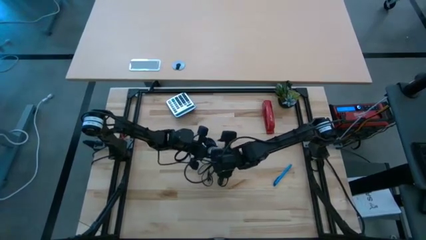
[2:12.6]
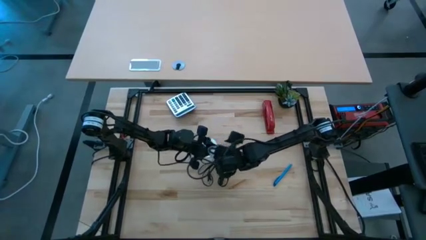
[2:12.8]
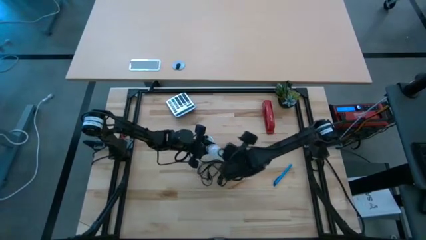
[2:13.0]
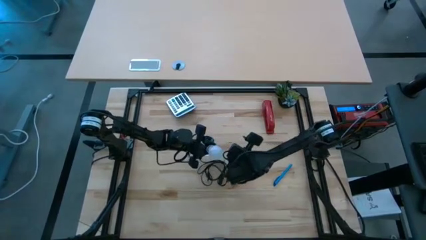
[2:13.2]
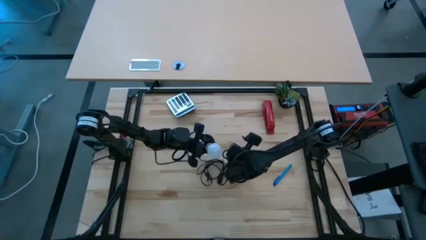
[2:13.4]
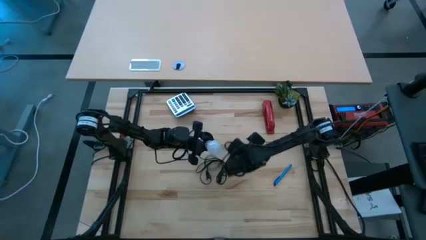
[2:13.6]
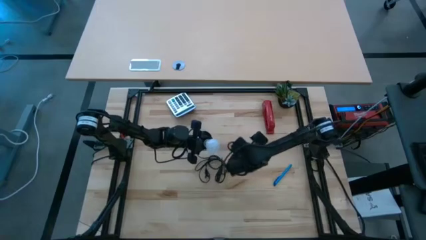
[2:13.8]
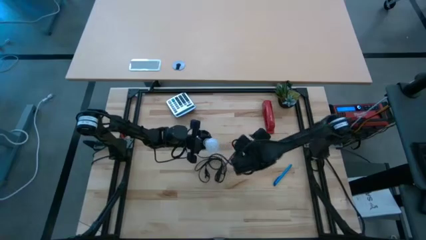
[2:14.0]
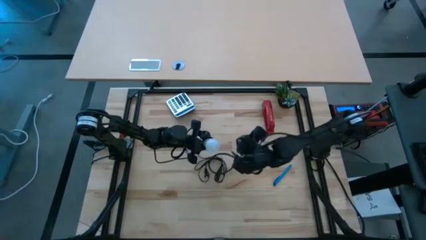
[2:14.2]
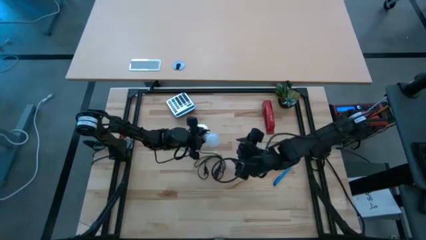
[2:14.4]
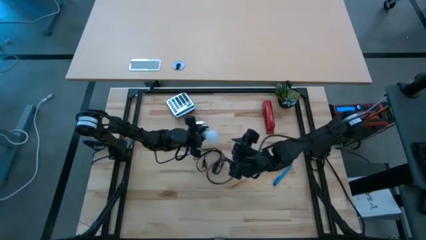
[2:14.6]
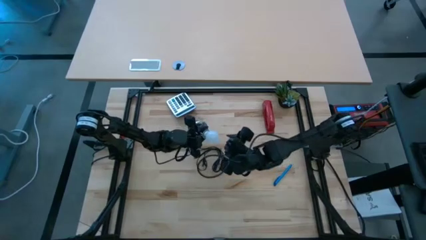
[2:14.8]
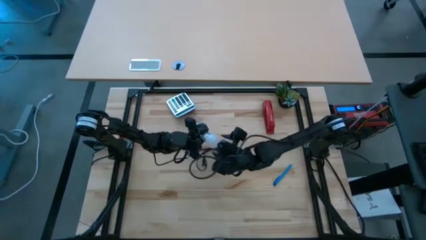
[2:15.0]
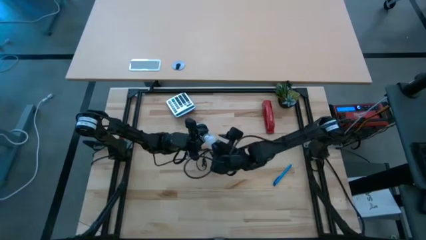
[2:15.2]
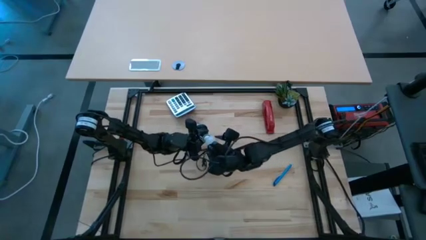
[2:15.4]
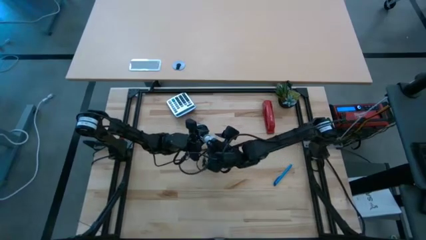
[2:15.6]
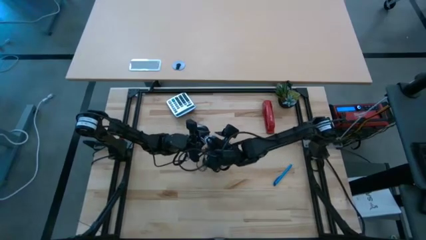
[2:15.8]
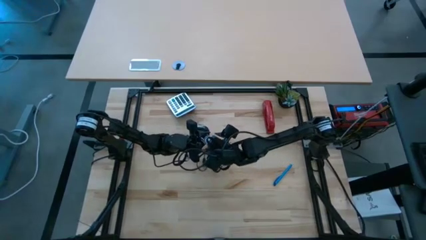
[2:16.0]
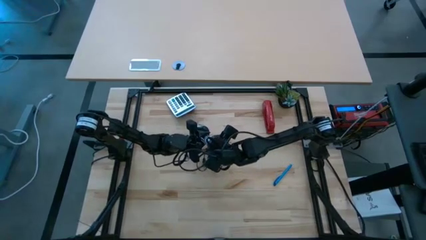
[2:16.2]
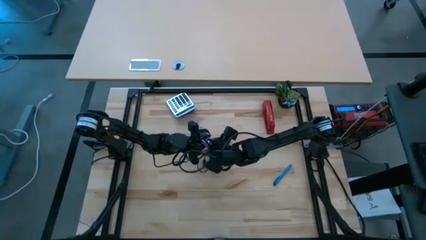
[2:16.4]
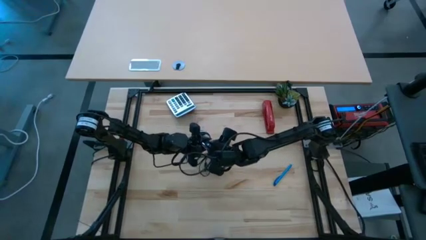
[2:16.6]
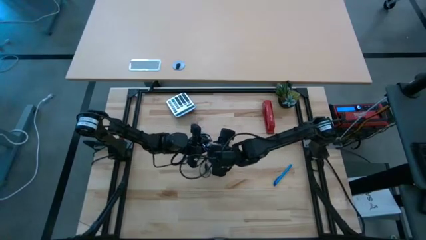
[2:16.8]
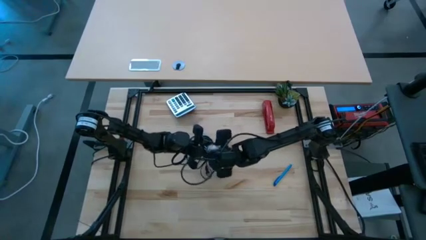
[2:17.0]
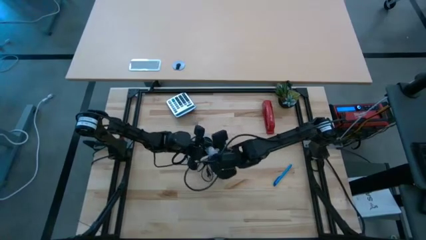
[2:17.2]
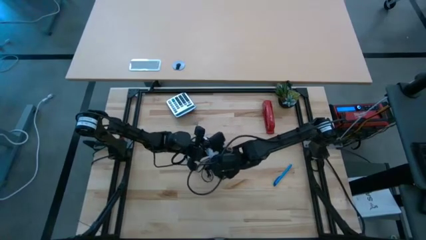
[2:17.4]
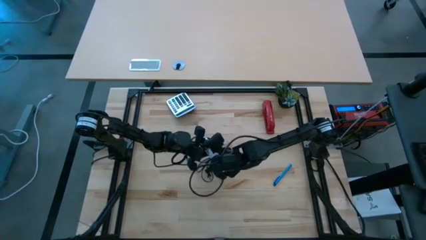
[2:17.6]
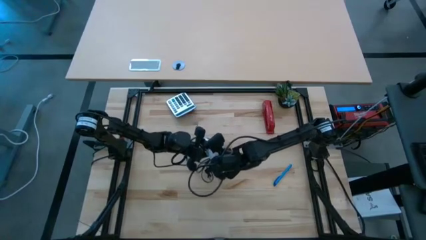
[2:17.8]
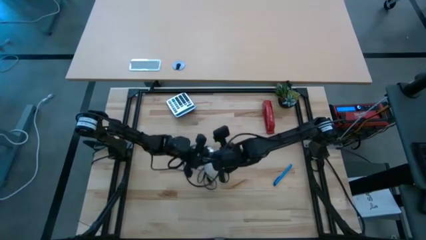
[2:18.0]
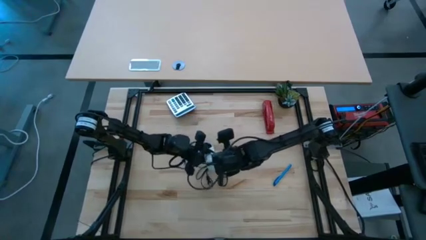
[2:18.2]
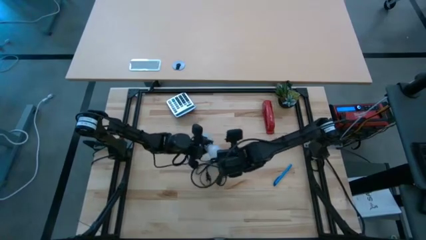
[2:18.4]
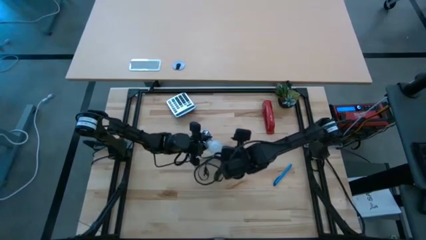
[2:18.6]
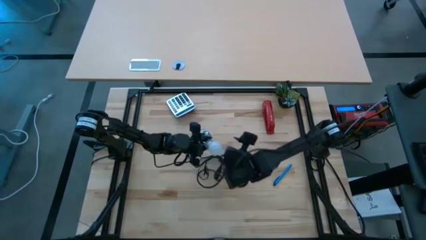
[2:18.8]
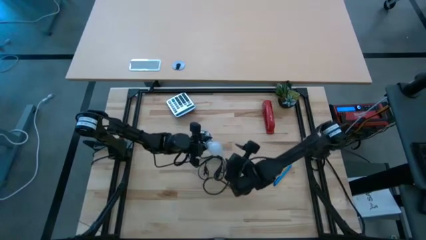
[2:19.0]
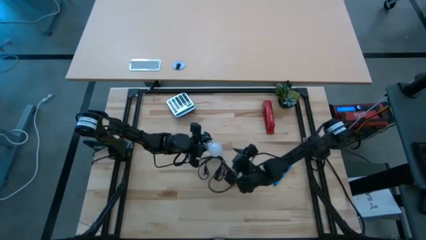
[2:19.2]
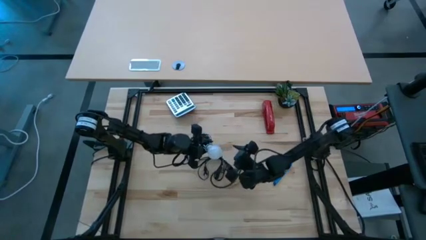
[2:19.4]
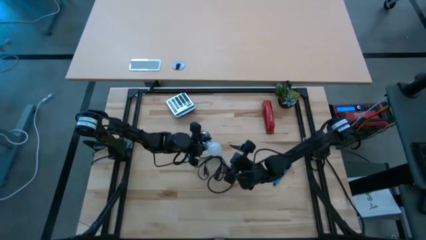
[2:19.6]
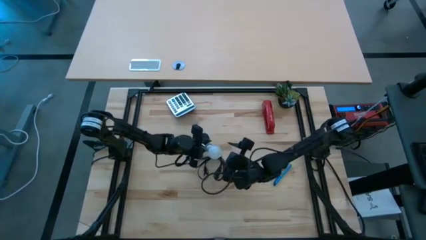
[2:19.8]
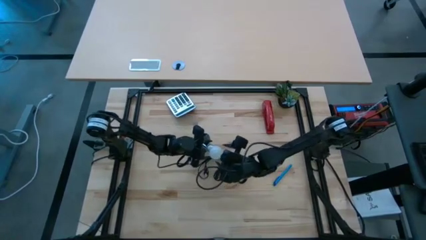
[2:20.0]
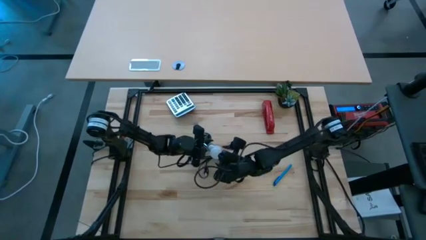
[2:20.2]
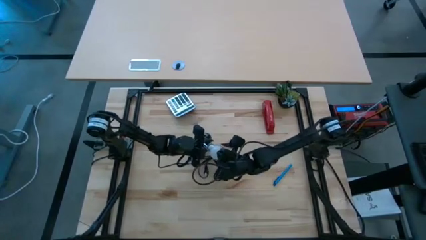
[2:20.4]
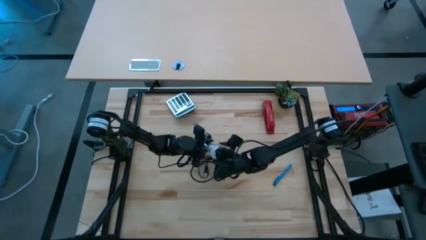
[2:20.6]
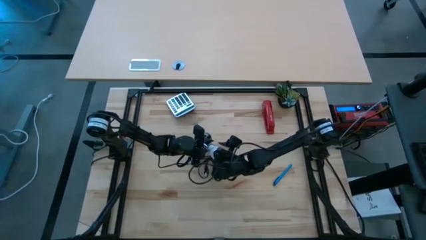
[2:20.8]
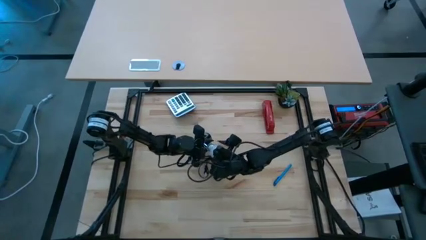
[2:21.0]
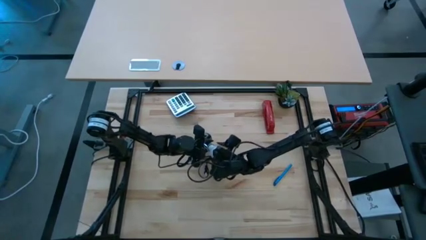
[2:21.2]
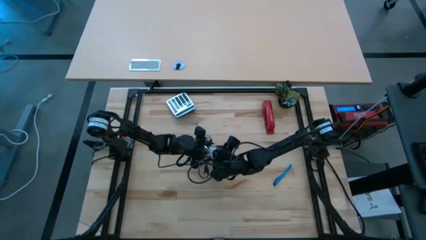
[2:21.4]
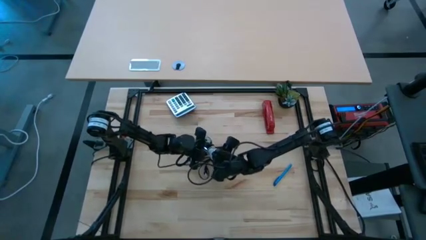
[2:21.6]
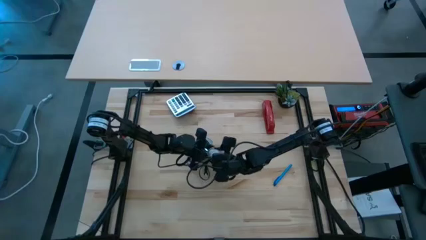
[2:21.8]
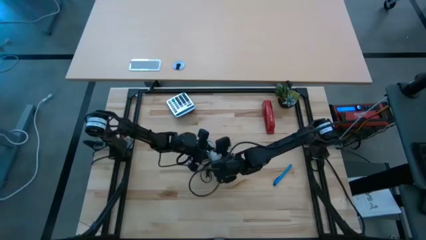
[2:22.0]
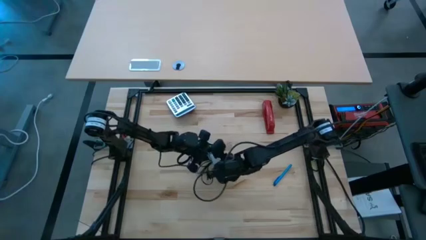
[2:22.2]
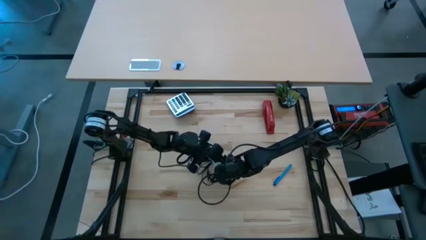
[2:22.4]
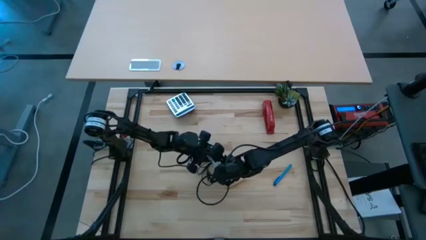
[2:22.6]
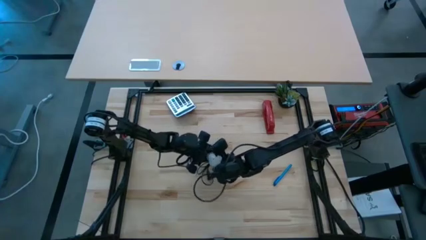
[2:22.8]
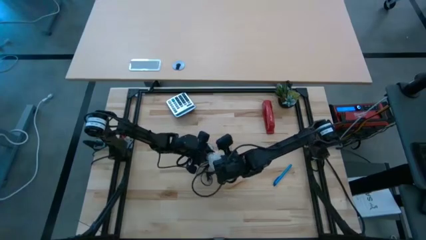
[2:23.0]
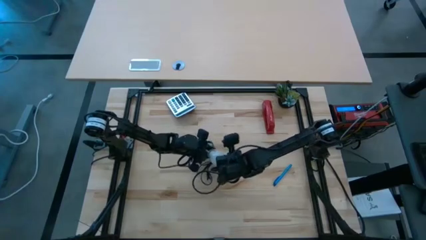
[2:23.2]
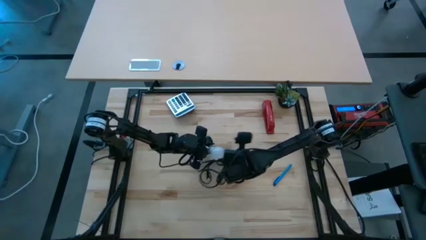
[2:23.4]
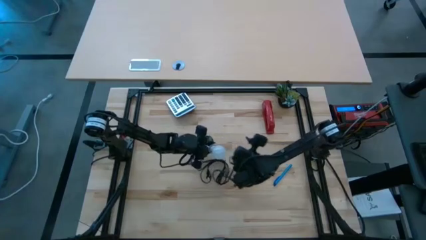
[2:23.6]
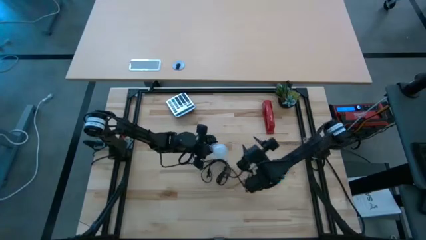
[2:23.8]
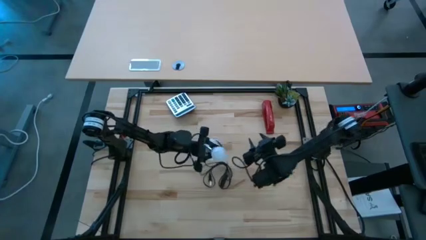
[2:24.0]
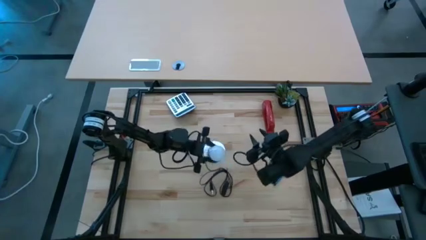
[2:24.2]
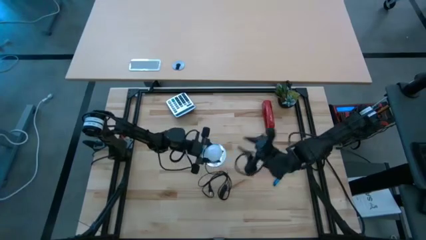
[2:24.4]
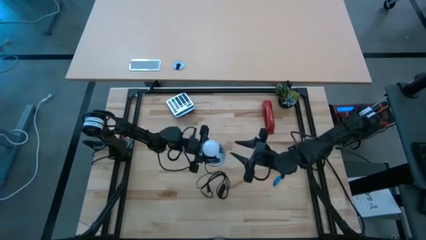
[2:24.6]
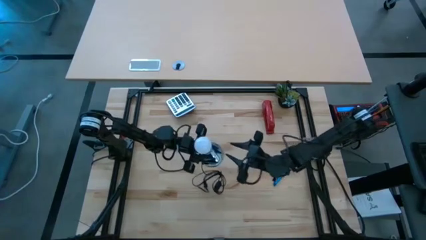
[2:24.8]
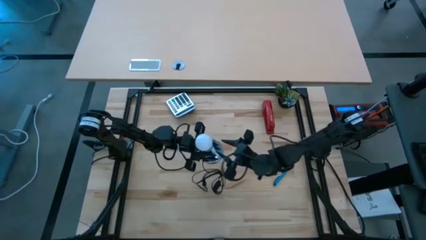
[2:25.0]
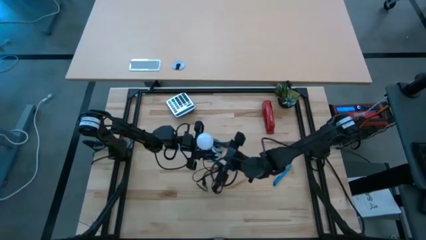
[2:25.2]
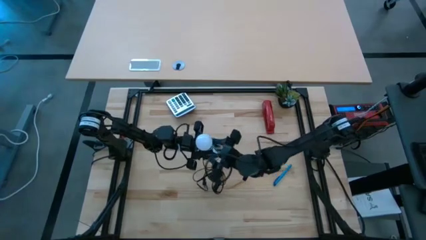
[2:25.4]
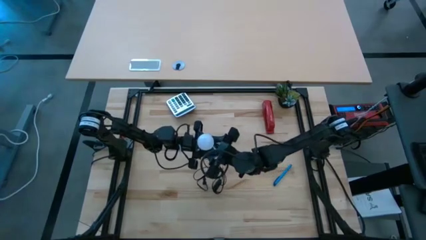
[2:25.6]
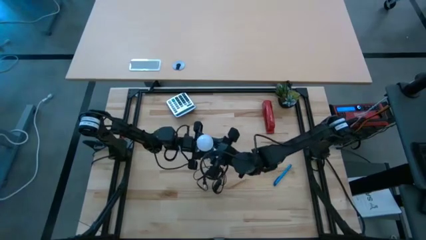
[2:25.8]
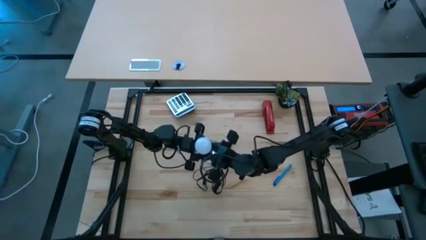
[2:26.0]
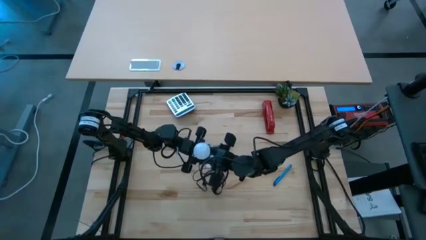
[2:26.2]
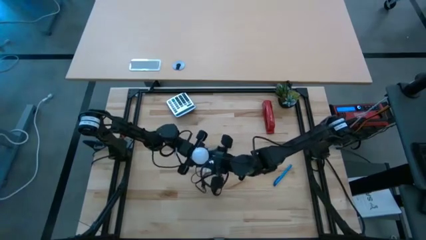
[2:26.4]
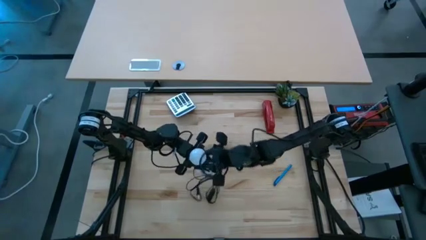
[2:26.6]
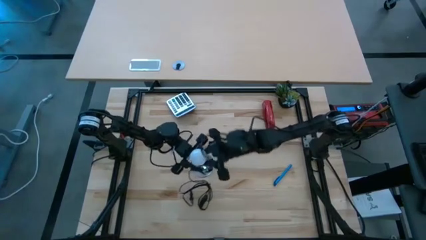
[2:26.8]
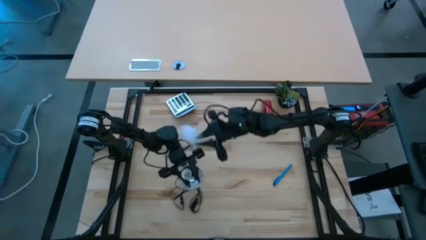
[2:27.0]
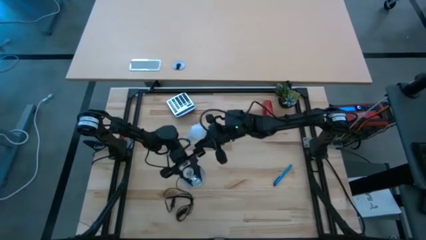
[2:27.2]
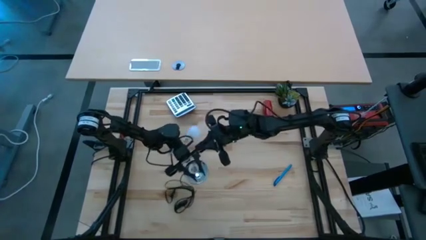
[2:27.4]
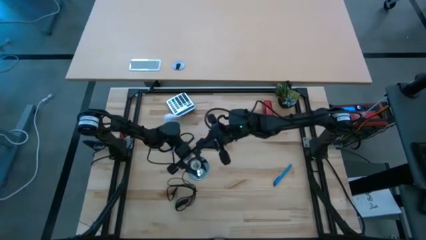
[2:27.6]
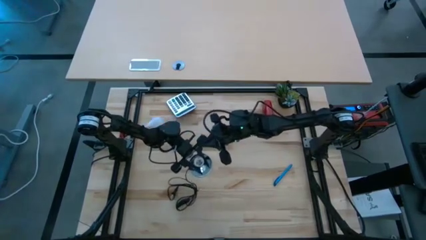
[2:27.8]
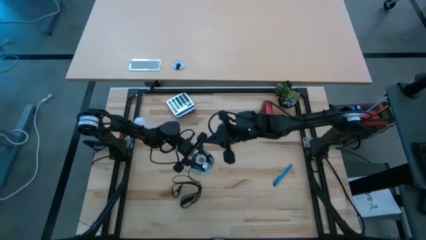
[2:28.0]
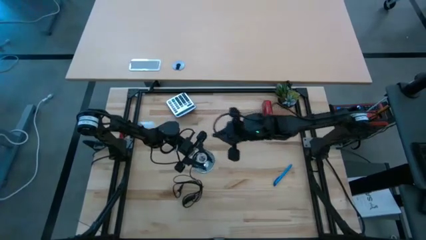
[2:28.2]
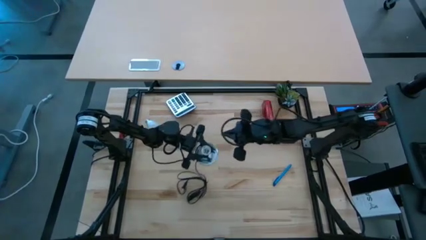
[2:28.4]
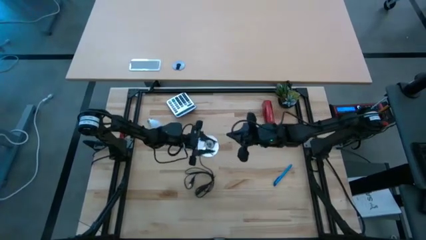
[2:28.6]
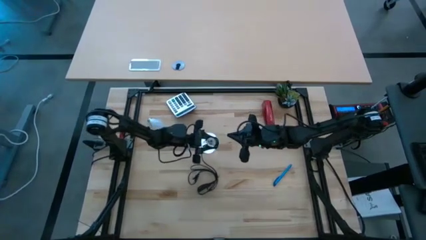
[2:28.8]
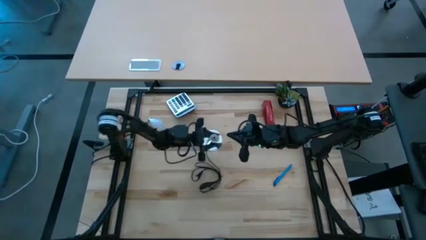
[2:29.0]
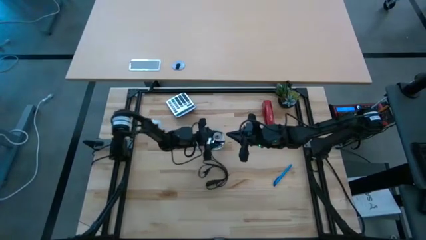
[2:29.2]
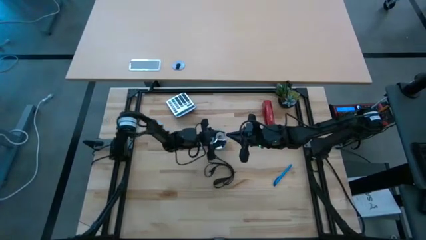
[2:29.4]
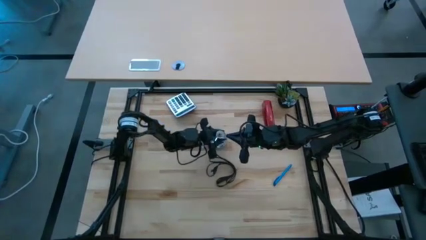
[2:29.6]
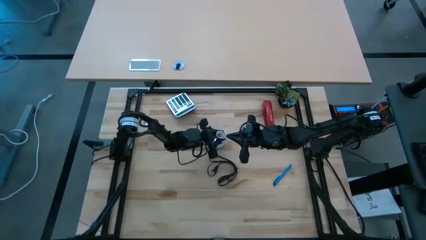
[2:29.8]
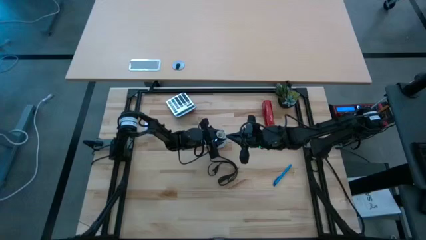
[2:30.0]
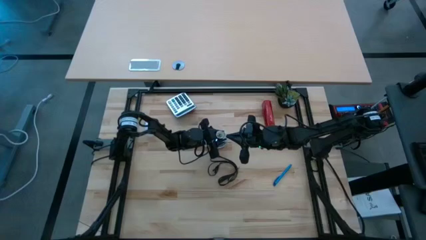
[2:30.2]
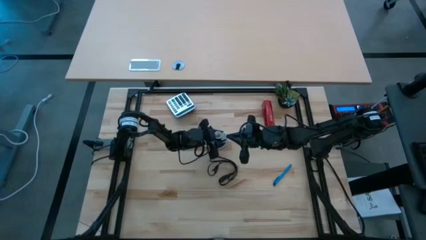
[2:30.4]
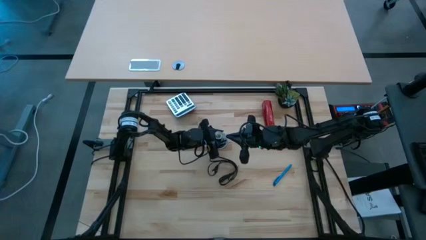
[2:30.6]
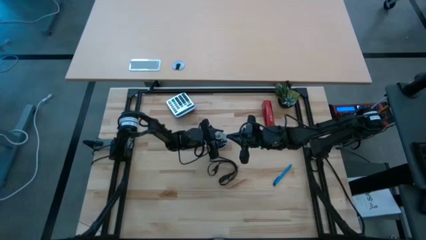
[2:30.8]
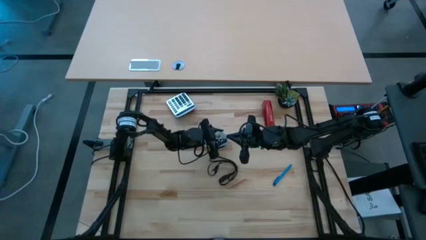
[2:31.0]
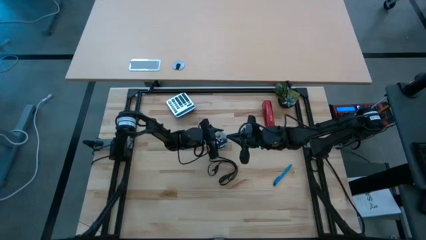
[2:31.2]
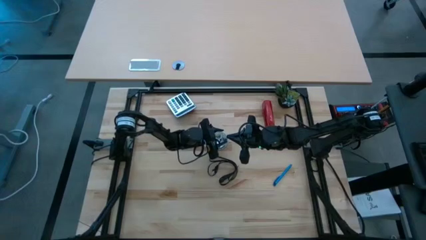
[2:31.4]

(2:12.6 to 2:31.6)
Task: Screw lightbulb
Remove the white lightbulb from the silver lamp
